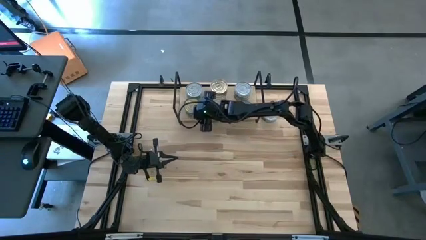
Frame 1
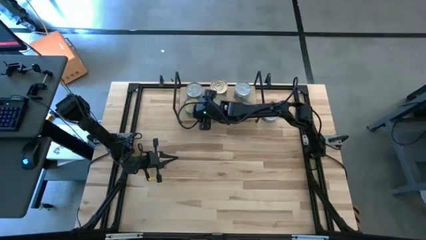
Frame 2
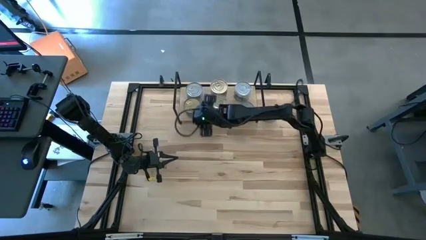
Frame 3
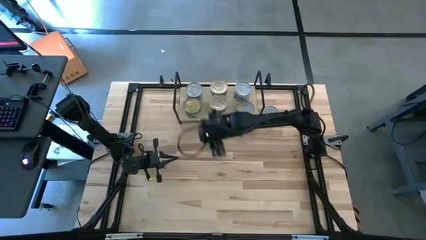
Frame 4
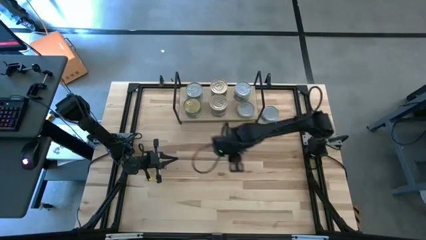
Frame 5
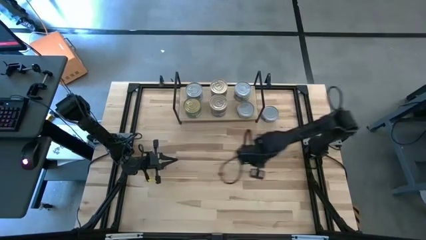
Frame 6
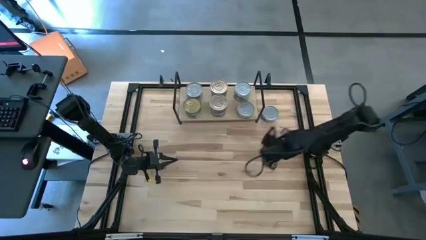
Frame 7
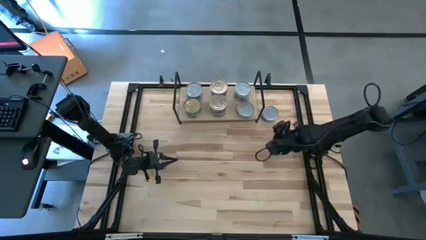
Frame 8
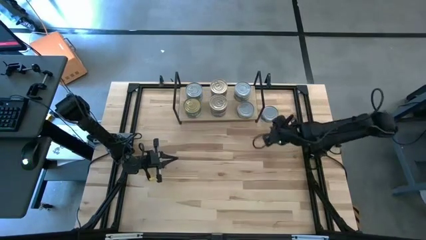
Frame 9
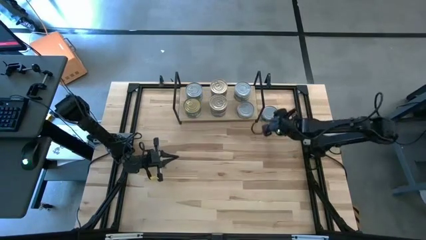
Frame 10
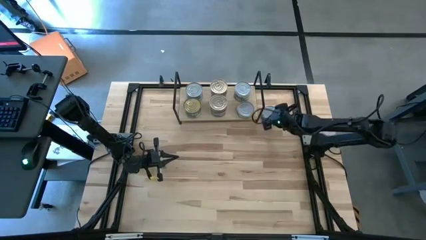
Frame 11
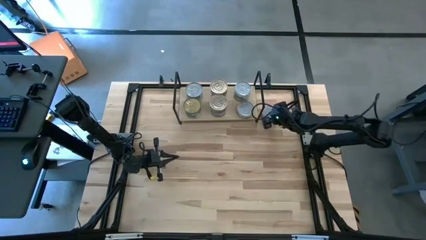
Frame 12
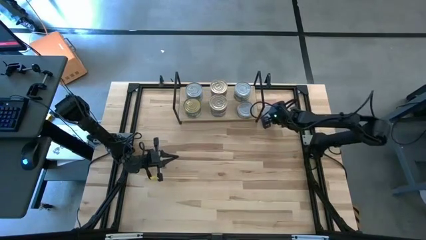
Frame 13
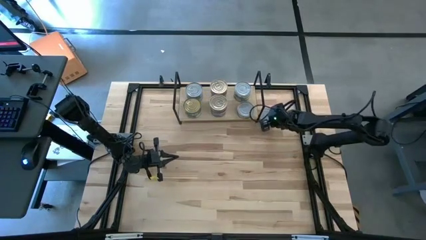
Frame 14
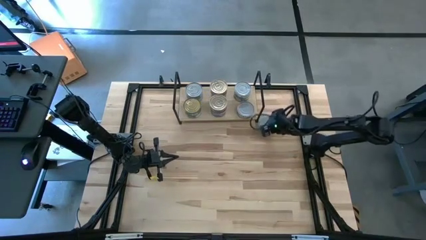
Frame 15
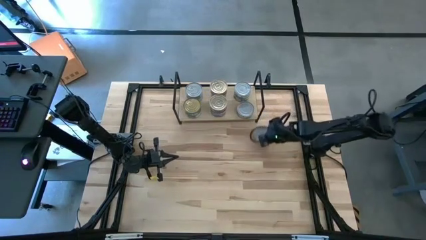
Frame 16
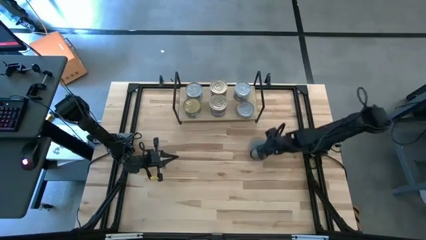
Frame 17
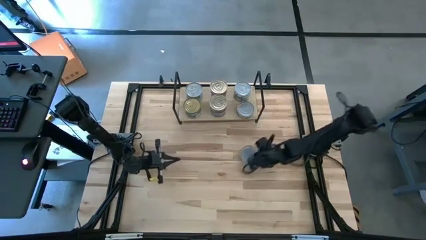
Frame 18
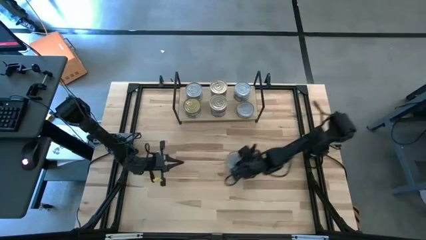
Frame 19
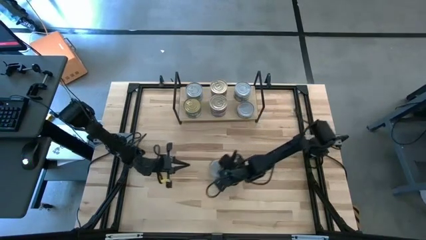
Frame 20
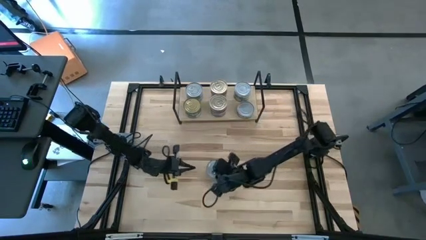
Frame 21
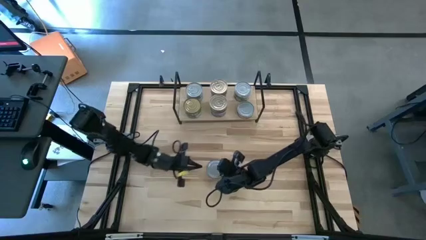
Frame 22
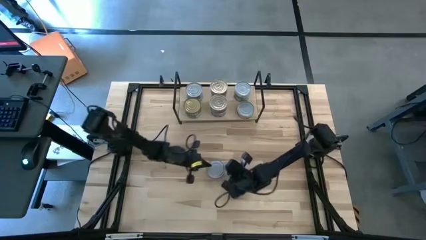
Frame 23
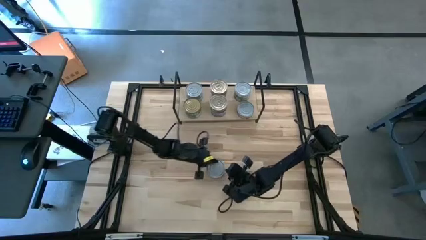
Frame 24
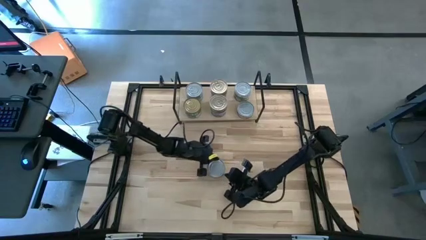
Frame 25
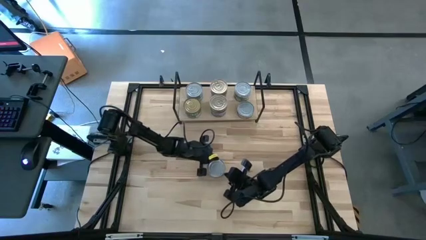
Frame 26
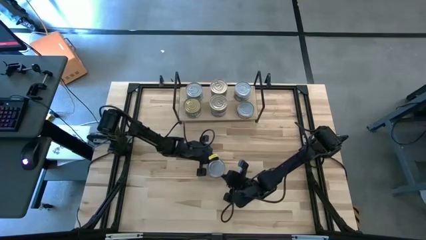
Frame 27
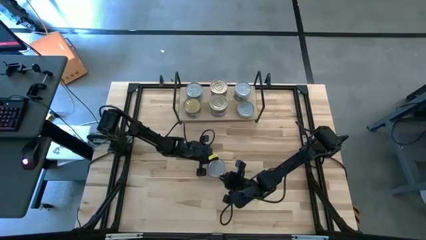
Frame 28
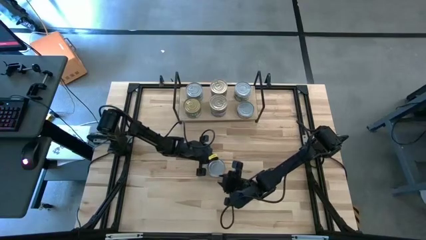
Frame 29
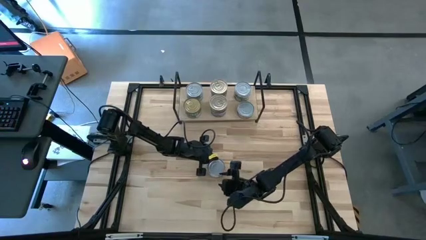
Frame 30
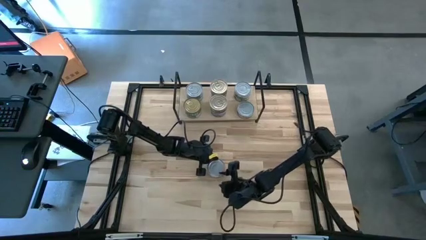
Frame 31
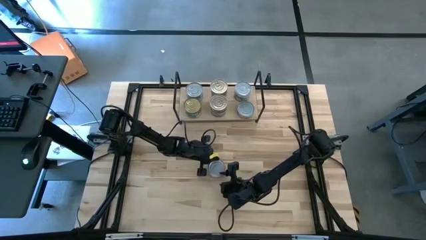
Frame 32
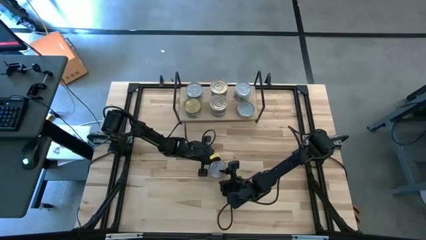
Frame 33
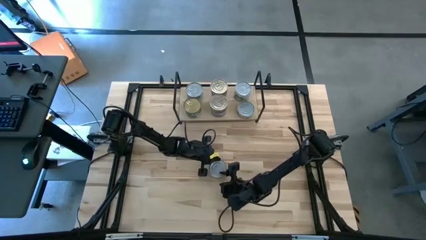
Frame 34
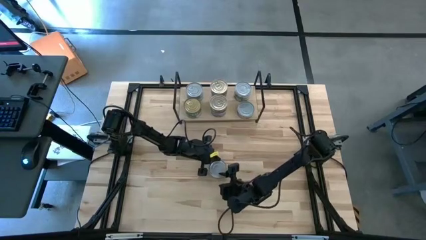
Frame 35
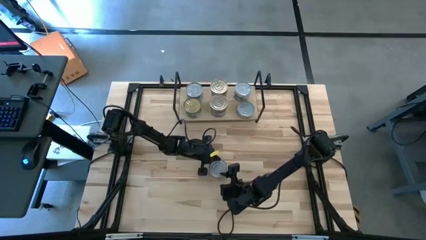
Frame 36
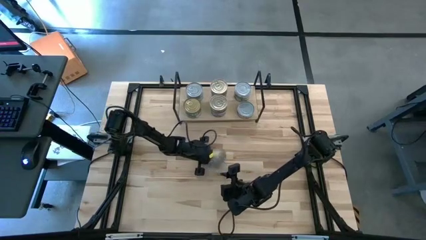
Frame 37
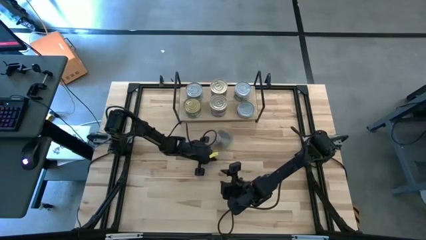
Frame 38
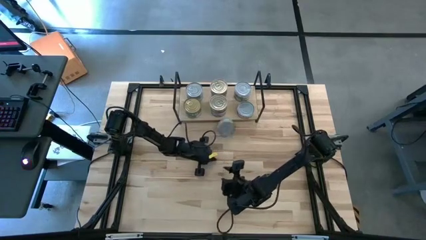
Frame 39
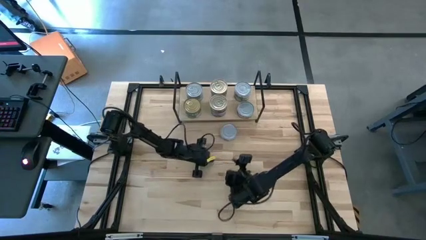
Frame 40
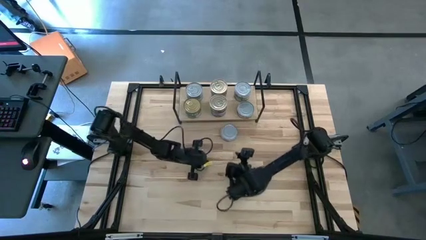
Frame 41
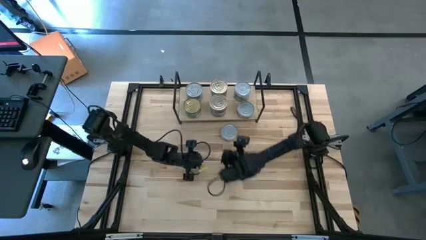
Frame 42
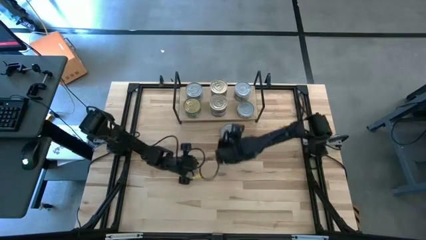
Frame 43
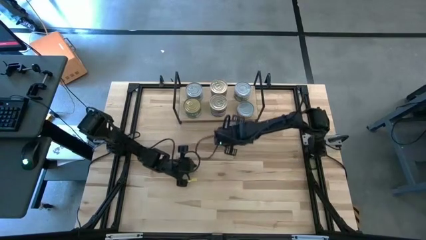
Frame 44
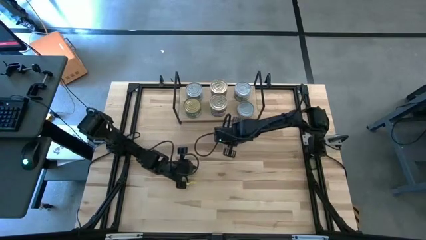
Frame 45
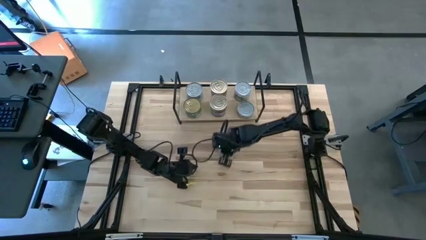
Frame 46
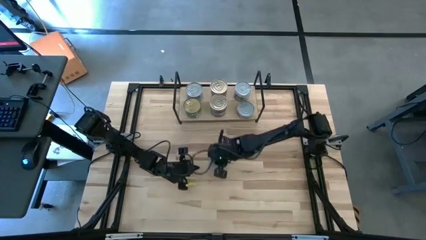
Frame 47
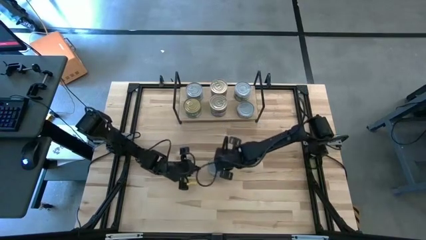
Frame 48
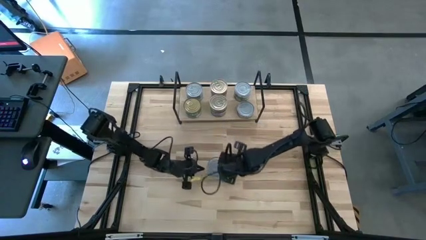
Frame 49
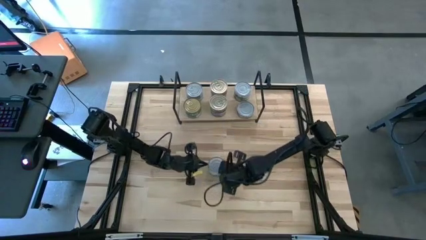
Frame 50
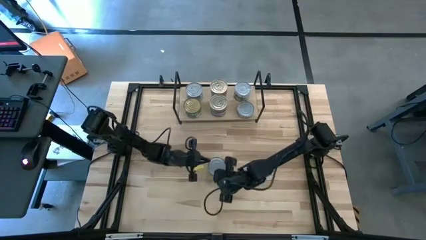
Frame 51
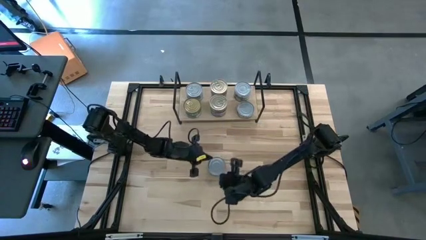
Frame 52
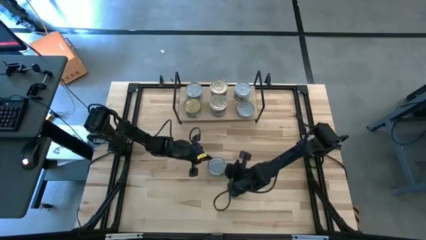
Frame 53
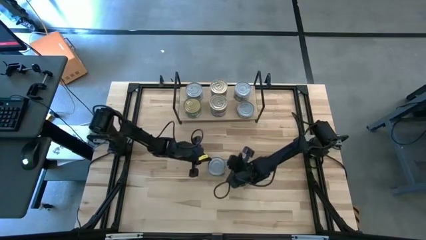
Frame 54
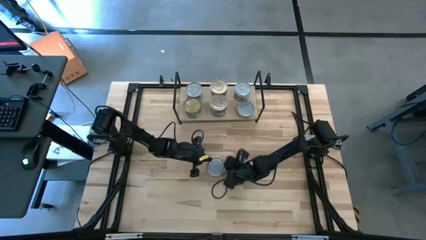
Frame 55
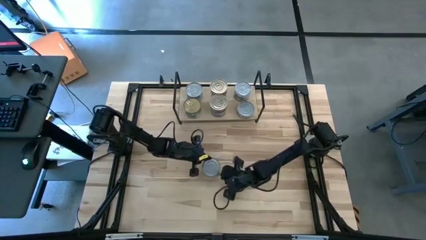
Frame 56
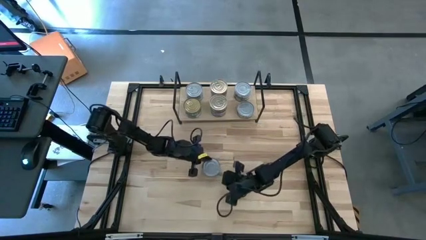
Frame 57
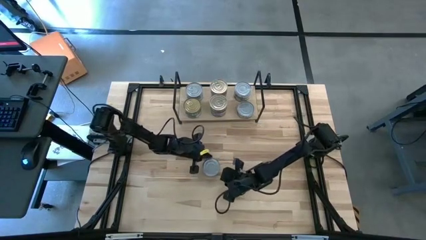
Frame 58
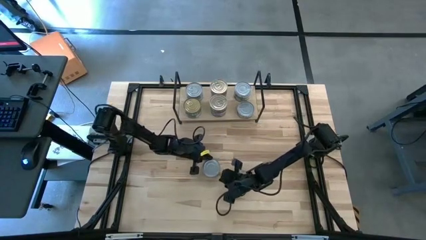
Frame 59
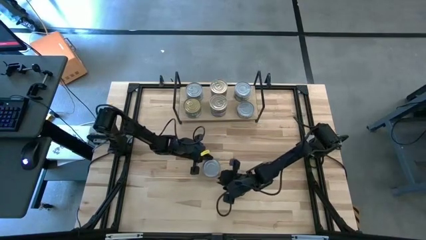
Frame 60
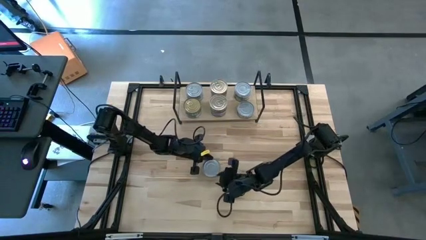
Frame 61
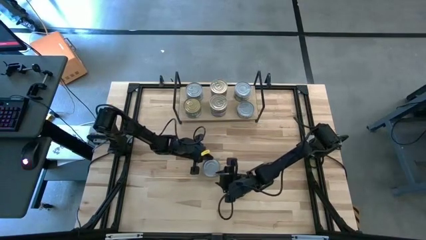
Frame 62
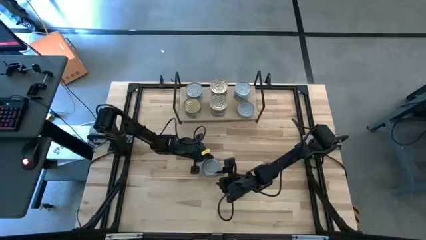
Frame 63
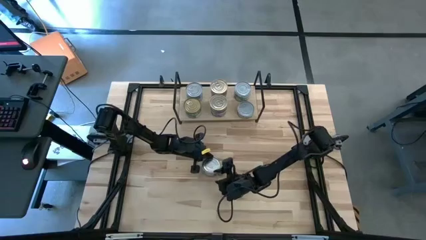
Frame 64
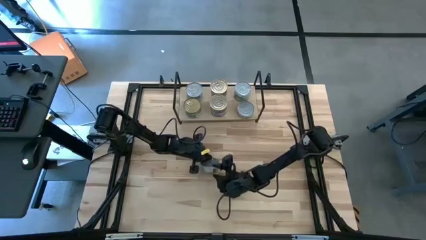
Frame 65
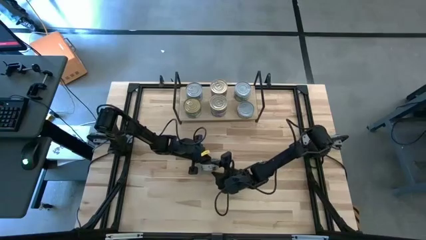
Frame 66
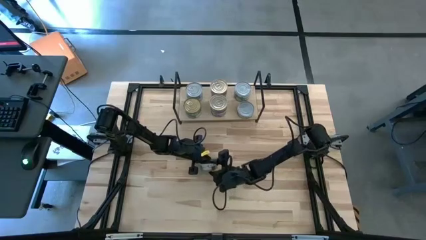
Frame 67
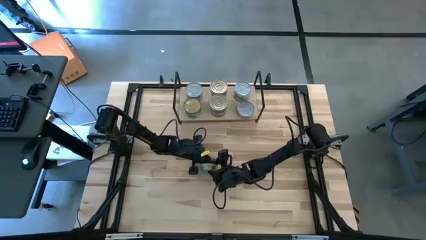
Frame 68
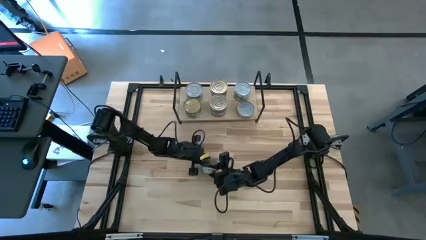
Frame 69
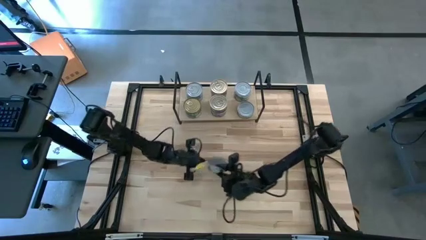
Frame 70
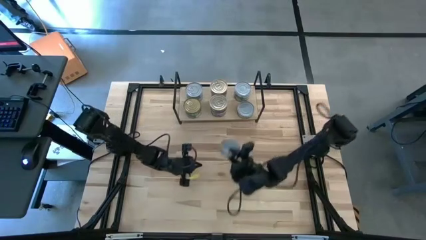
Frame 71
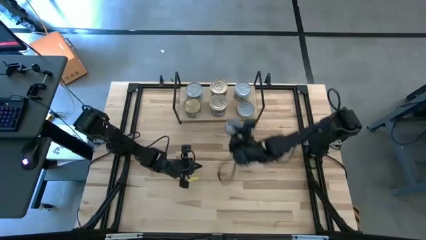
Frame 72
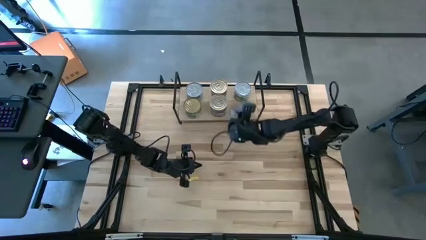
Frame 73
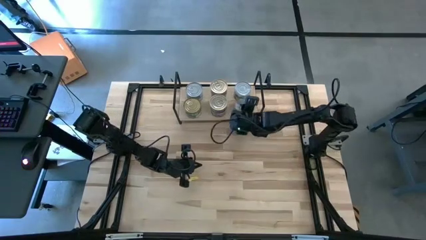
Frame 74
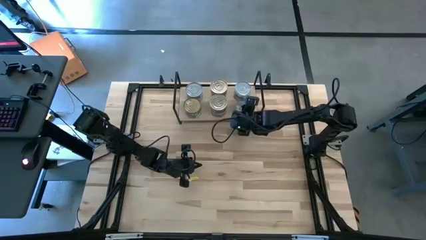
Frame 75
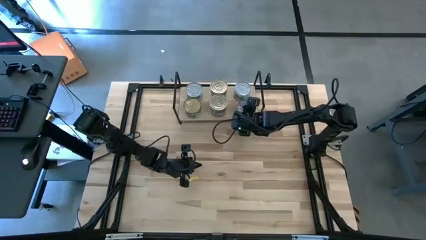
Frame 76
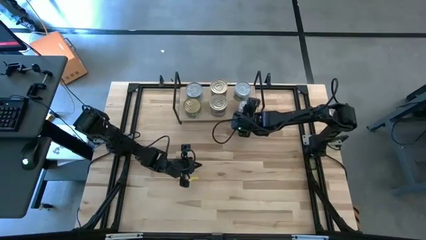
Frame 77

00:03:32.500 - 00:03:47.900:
Task: Stack canned seafood by type on shelf
Stack the green tuna can on top of the green tuna can on the shelf
